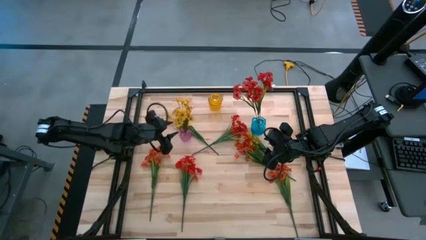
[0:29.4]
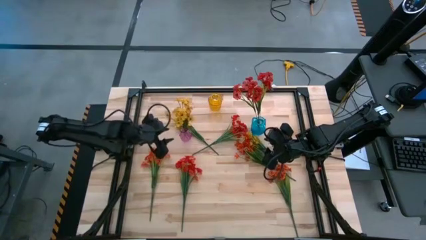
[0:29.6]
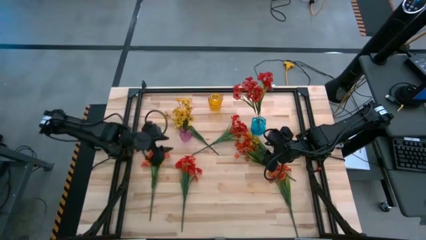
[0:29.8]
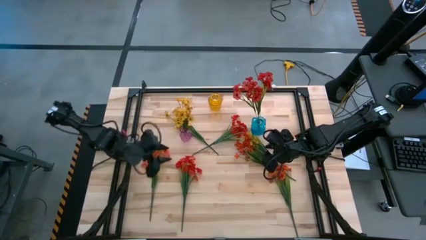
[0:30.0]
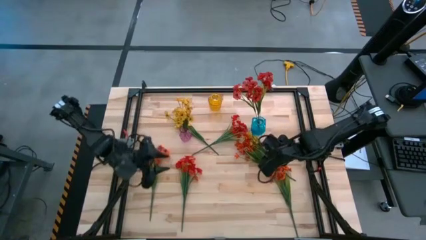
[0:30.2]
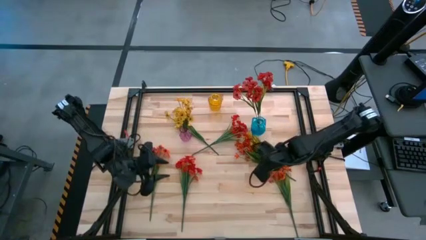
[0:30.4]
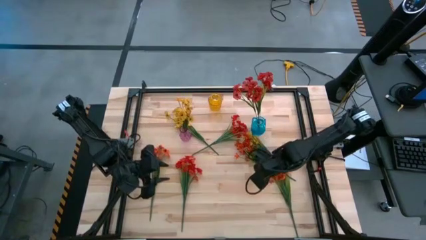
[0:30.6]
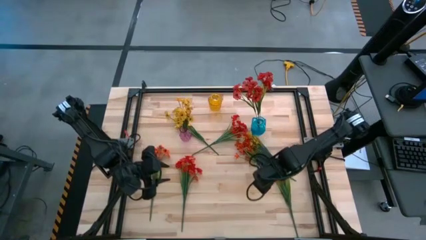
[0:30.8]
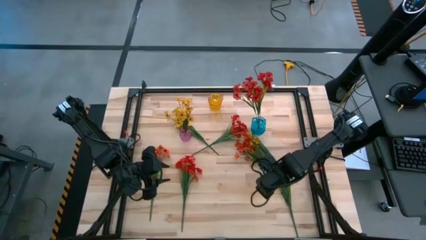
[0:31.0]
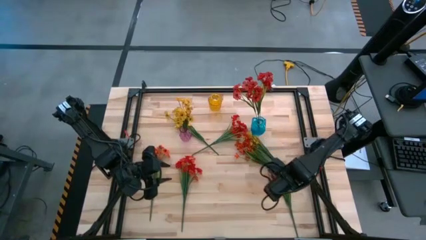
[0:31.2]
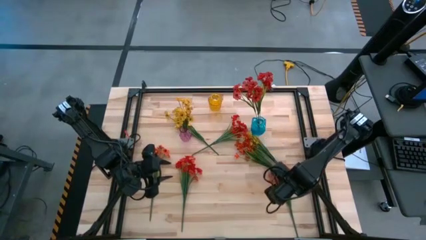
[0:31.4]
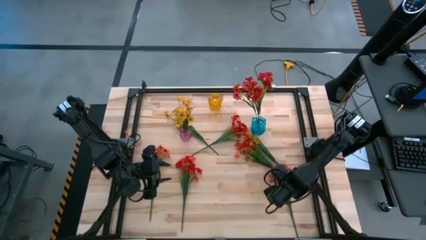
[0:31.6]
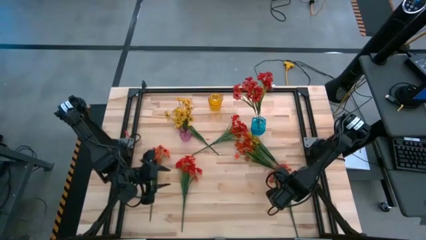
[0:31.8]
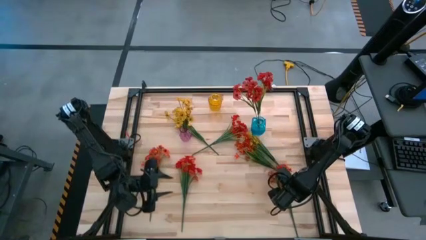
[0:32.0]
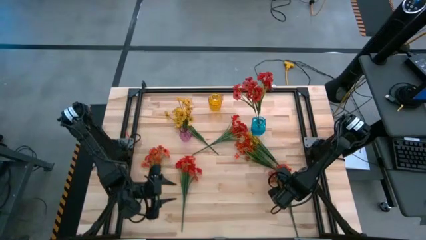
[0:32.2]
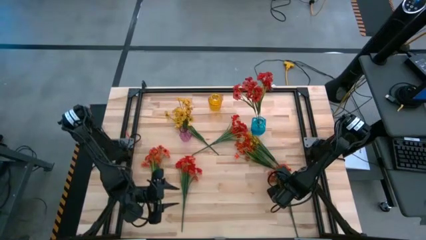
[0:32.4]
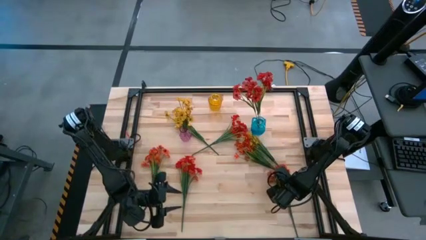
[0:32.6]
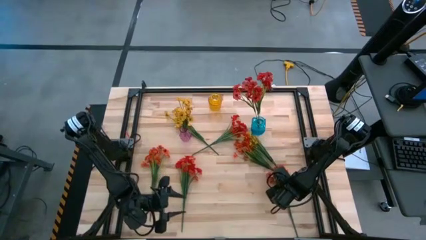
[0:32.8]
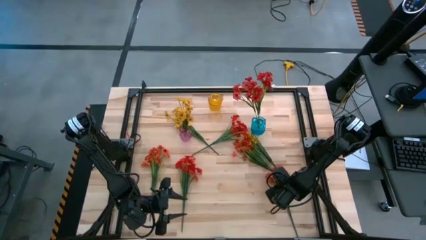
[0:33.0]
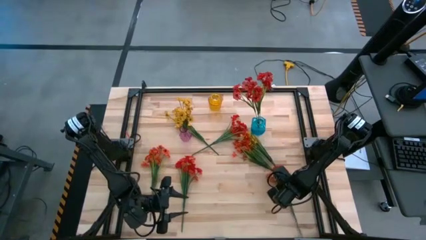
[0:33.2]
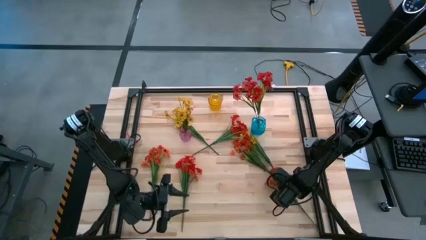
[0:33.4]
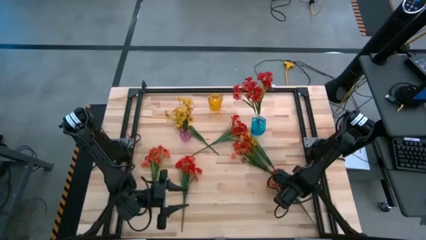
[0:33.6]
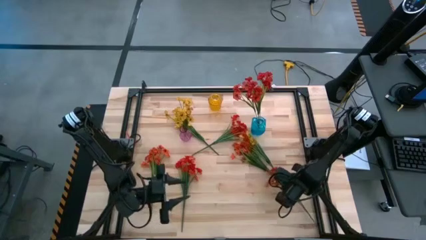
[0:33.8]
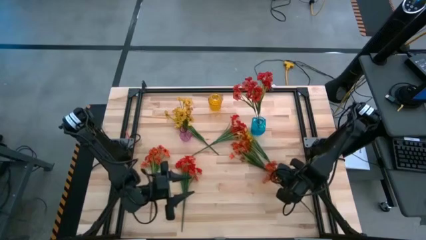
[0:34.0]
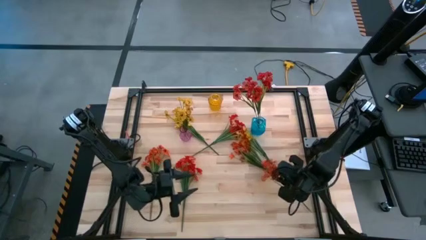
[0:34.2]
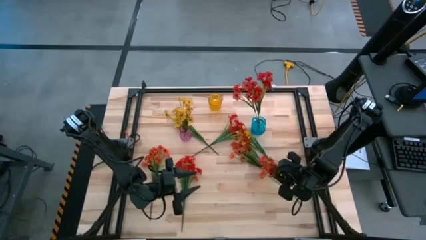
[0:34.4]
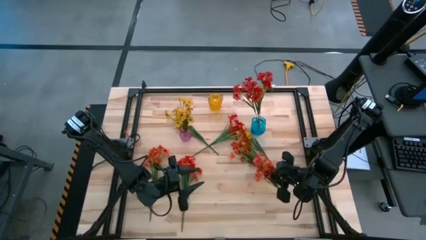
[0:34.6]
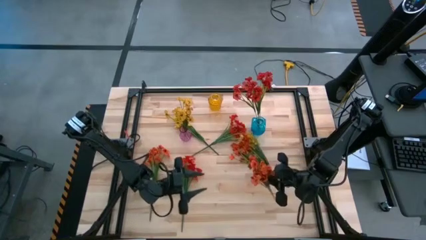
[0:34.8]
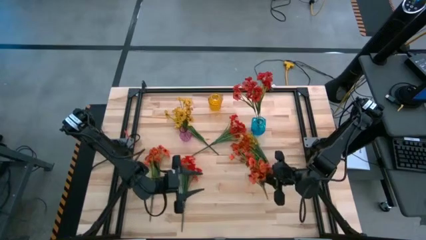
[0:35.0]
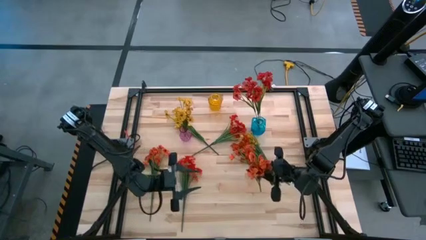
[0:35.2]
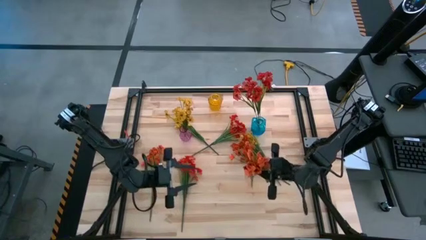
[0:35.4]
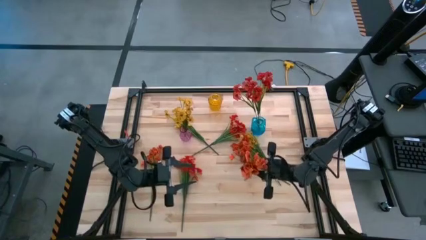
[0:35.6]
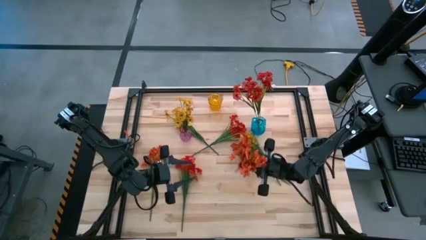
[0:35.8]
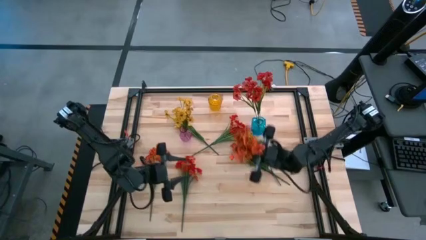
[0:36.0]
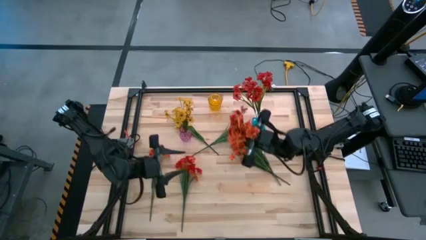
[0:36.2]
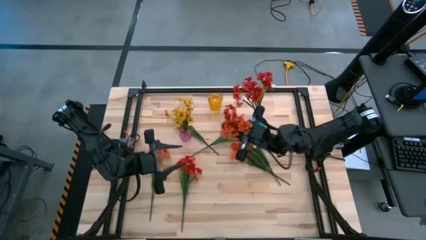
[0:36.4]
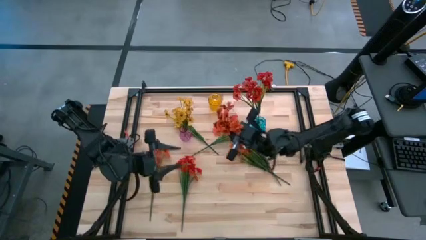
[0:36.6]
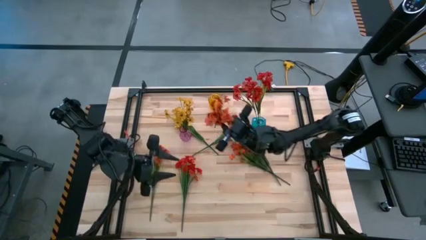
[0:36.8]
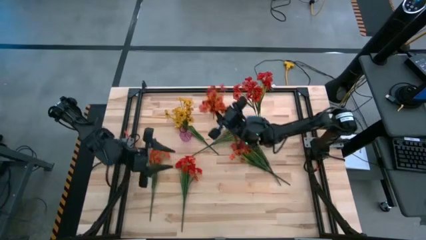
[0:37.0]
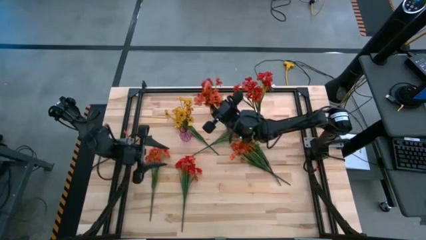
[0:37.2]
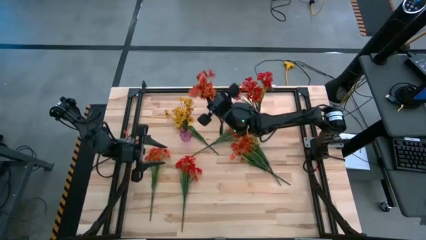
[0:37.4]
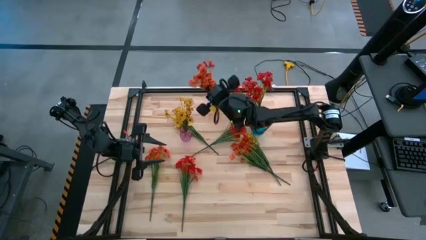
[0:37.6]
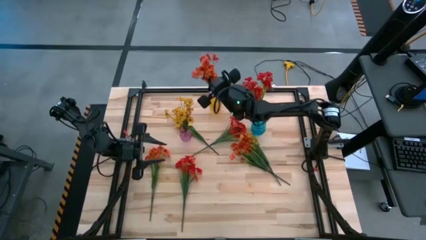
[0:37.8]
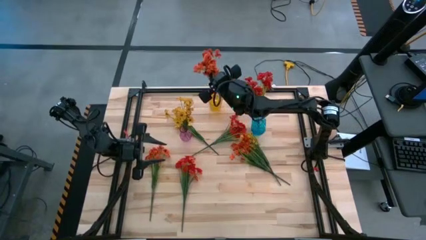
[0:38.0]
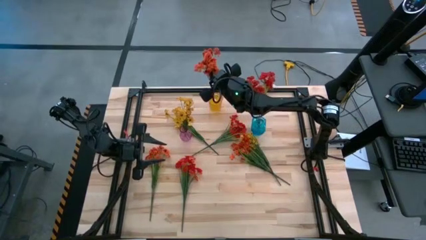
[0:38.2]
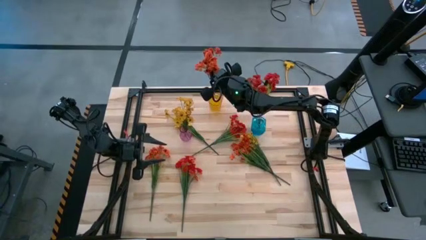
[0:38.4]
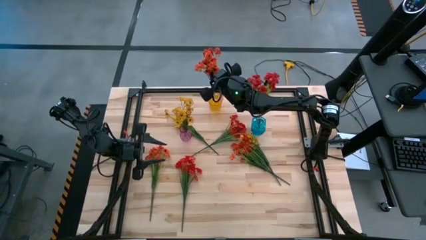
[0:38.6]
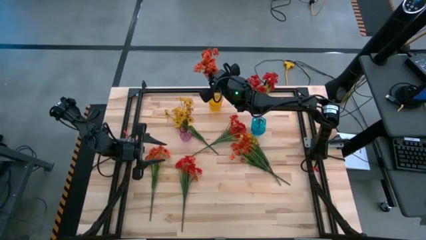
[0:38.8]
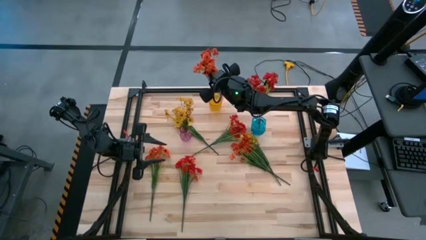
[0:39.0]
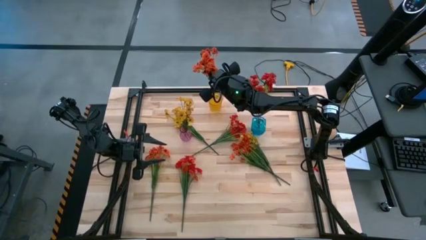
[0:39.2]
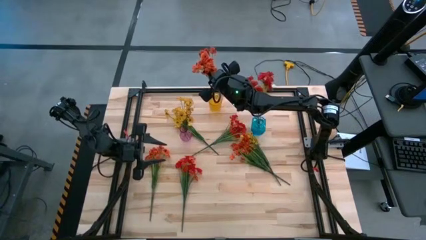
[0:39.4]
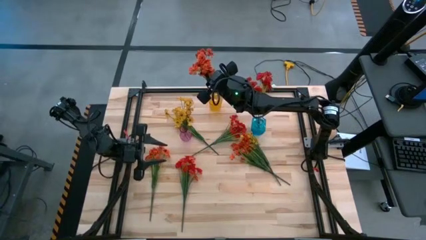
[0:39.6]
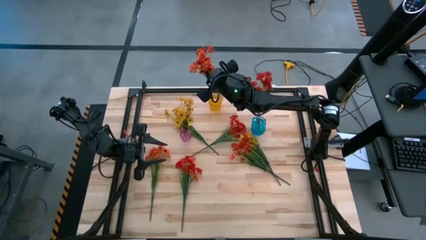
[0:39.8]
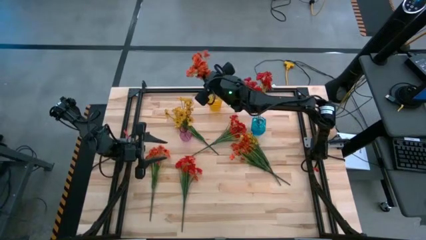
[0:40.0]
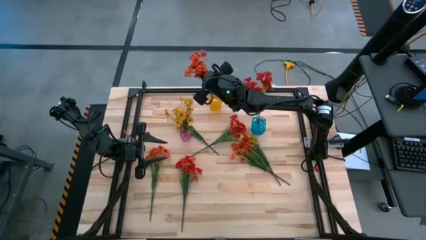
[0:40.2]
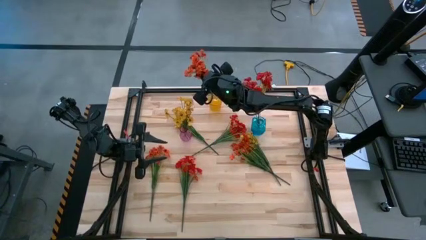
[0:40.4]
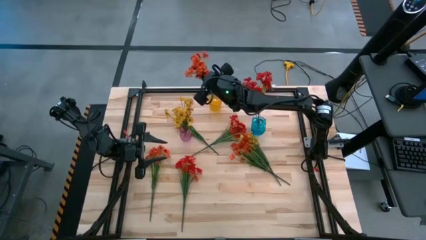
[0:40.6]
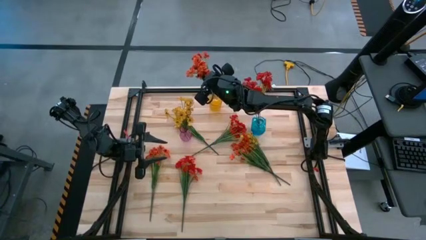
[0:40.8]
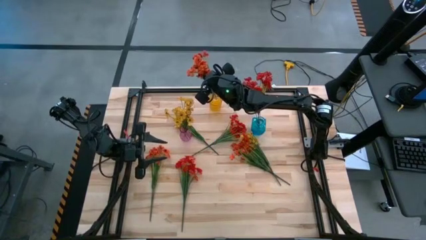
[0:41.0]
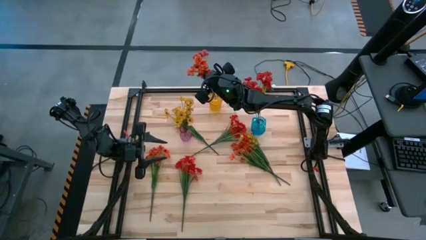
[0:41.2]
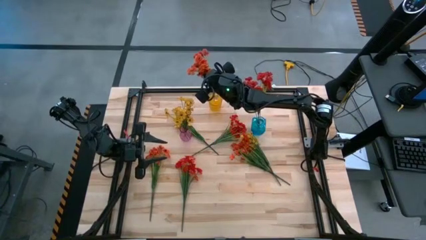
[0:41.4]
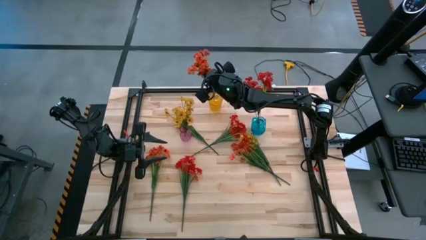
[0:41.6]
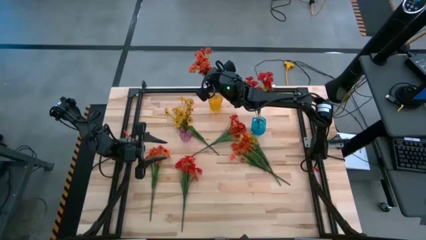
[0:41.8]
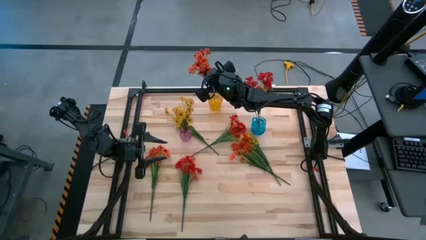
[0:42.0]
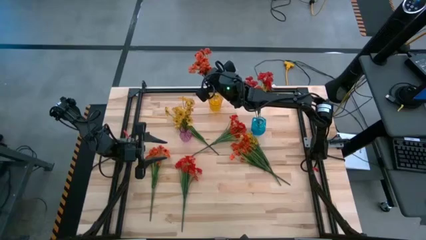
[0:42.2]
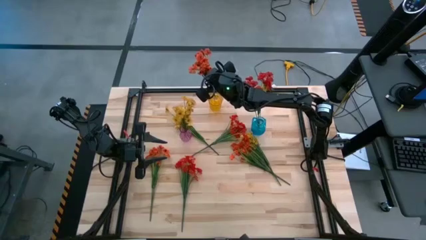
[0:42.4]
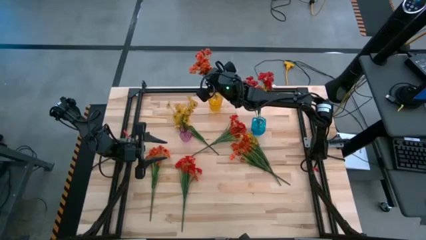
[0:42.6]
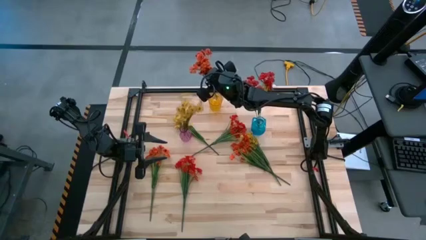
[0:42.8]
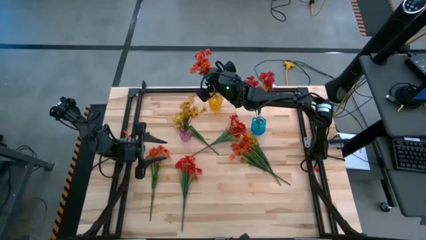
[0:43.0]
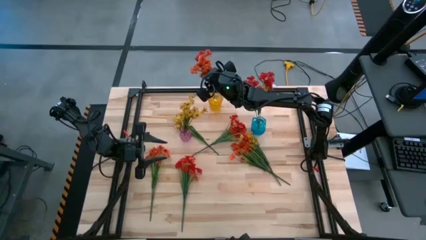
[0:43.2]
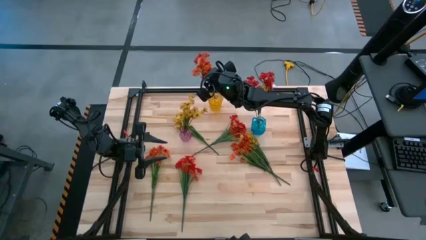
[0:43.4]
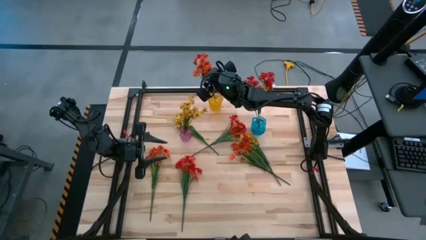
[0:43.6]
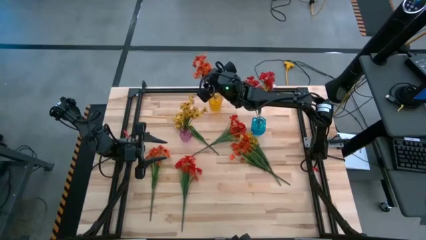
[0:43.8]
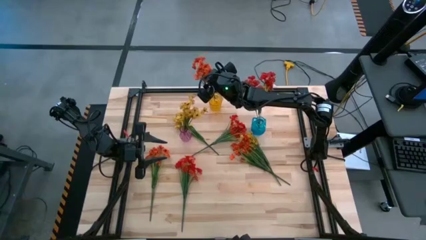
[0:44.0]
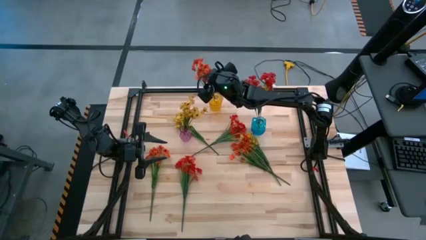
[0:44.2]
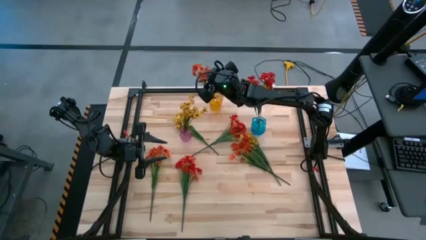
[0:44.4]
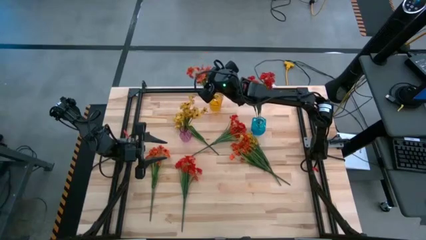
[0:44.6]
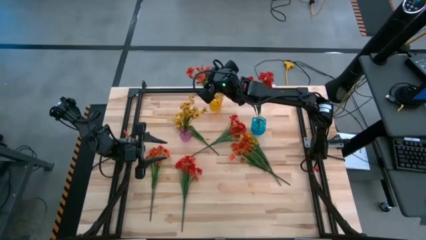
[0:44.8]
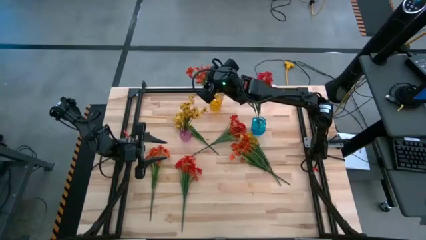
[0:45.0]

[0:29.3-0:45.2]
Task: Sort flowers into vase by color
Put the bottom right orange flower into the yellow vase
